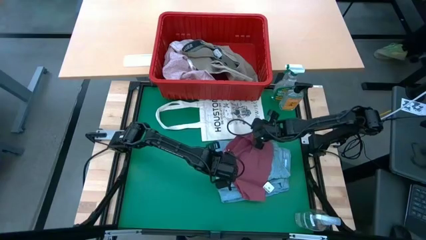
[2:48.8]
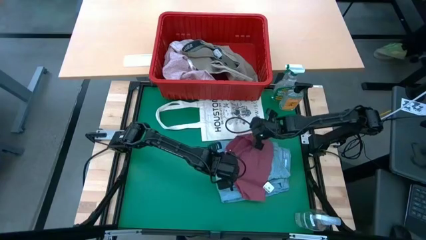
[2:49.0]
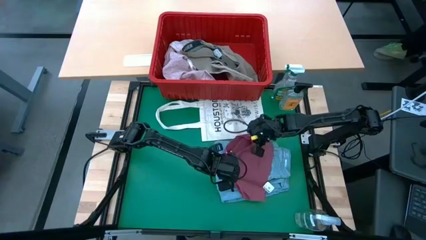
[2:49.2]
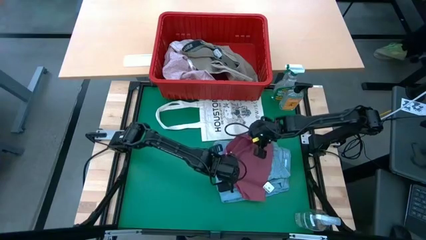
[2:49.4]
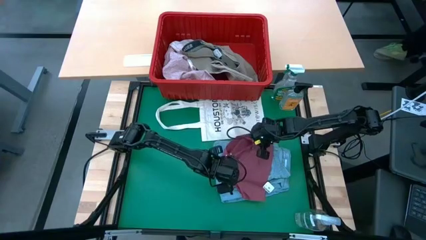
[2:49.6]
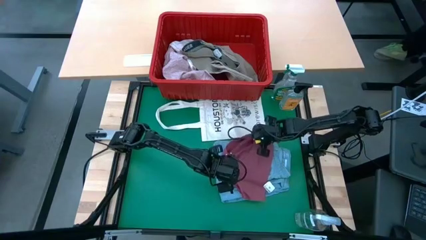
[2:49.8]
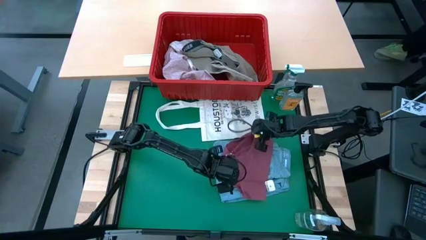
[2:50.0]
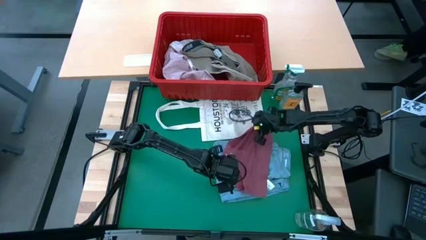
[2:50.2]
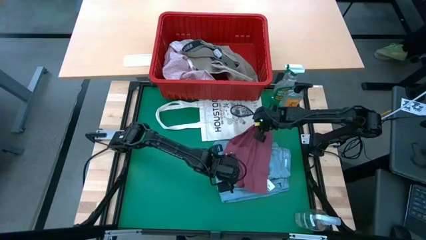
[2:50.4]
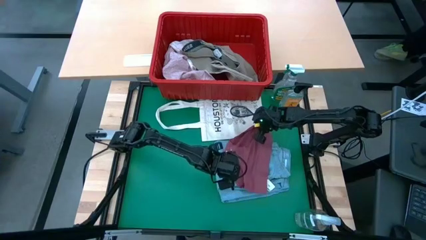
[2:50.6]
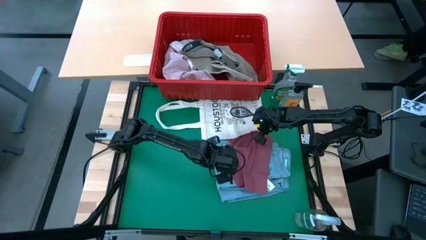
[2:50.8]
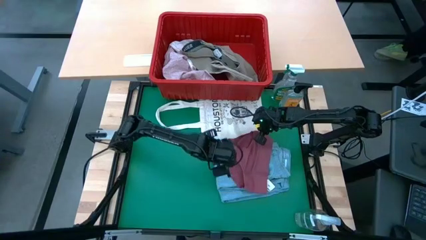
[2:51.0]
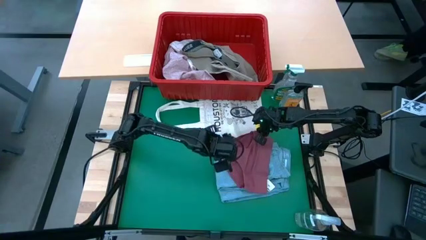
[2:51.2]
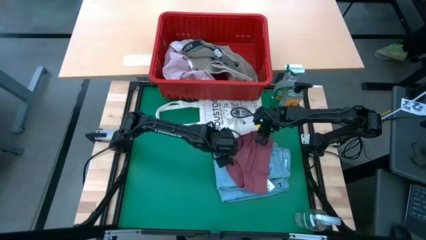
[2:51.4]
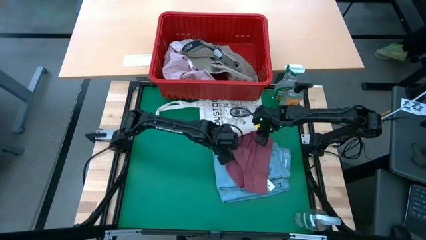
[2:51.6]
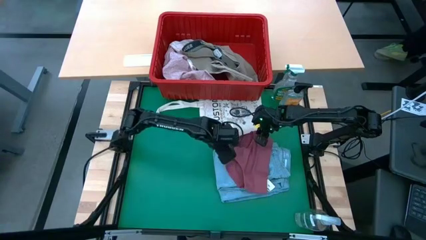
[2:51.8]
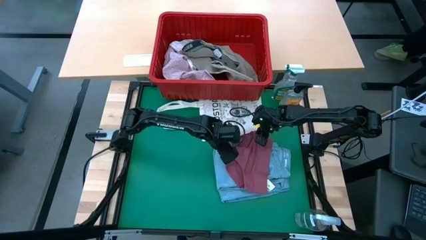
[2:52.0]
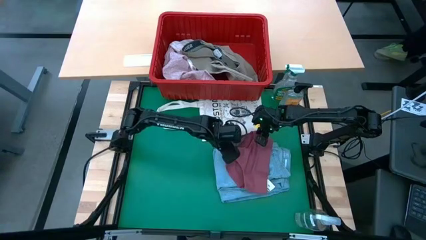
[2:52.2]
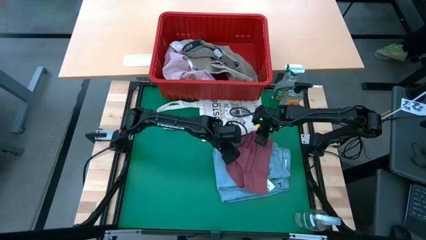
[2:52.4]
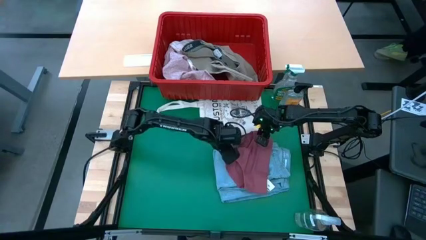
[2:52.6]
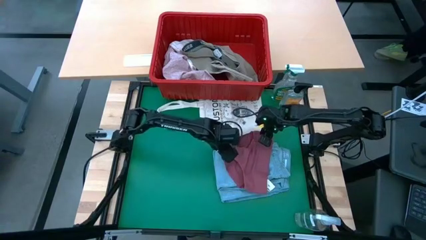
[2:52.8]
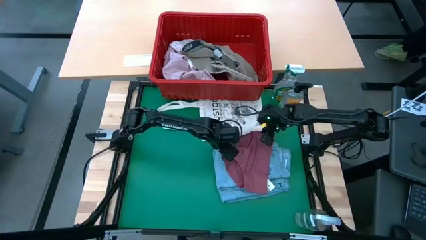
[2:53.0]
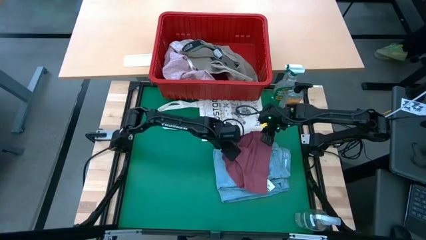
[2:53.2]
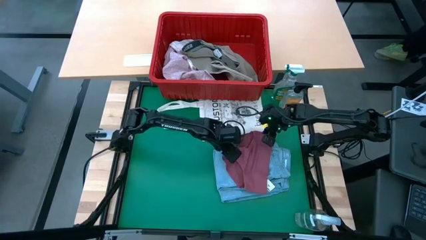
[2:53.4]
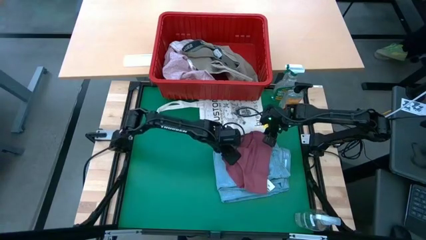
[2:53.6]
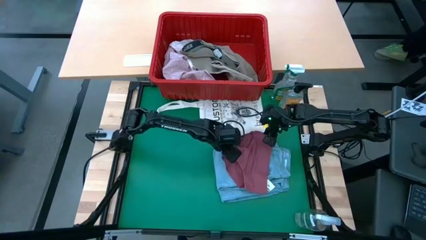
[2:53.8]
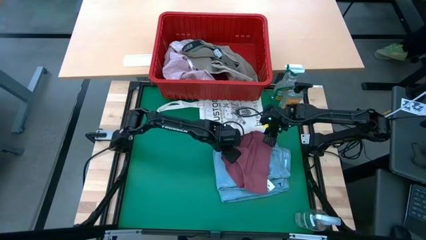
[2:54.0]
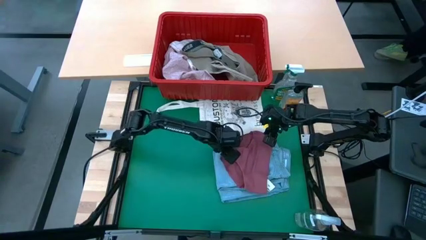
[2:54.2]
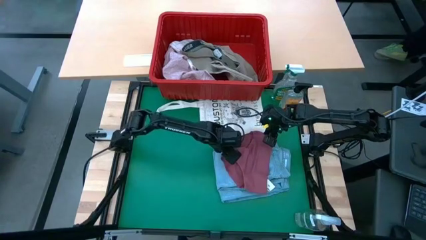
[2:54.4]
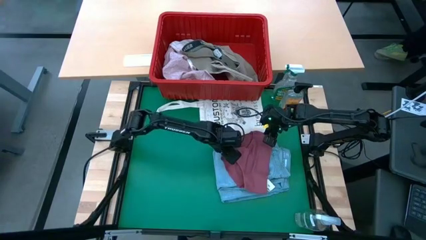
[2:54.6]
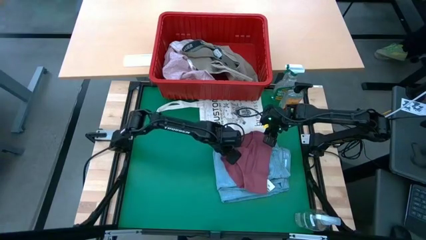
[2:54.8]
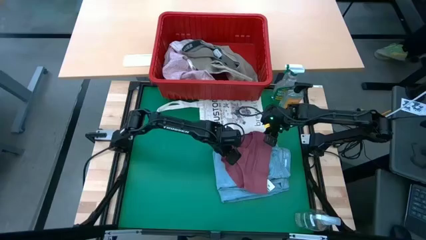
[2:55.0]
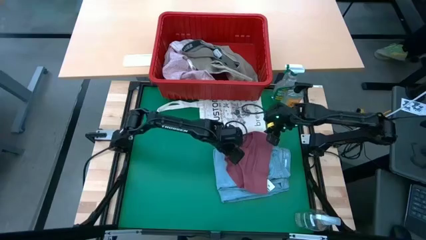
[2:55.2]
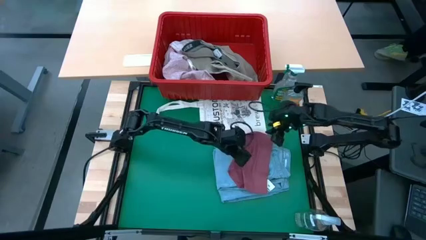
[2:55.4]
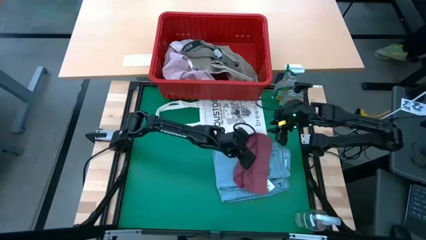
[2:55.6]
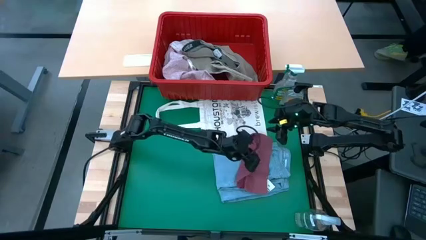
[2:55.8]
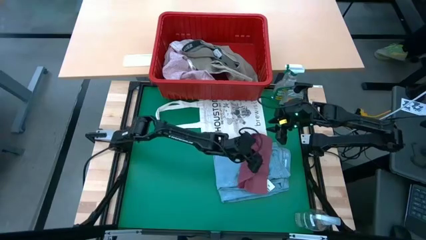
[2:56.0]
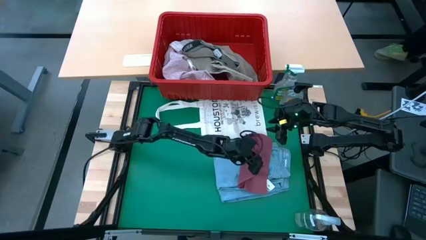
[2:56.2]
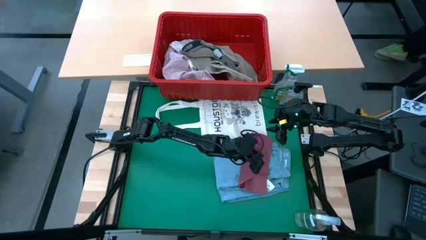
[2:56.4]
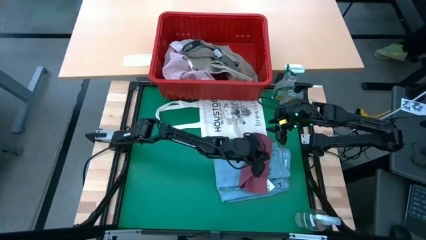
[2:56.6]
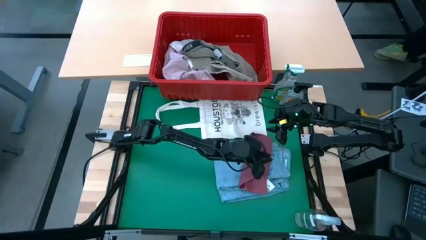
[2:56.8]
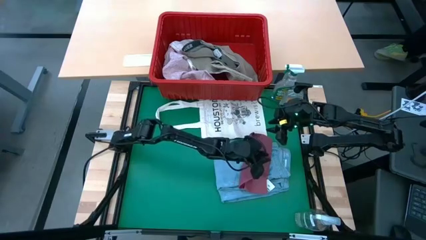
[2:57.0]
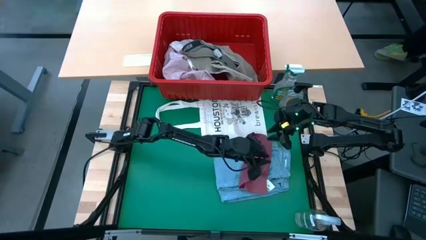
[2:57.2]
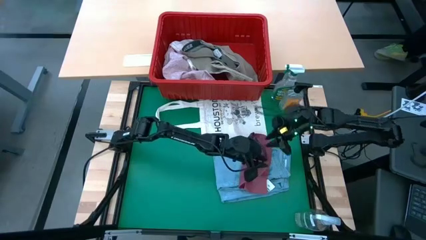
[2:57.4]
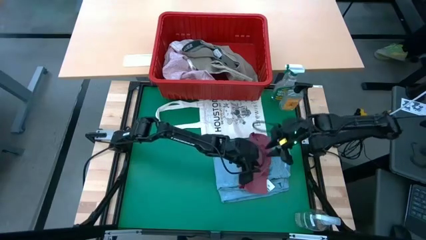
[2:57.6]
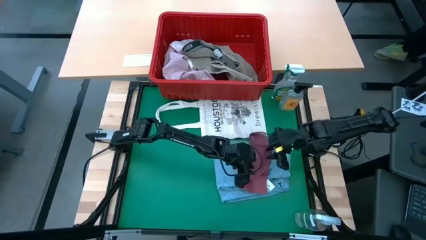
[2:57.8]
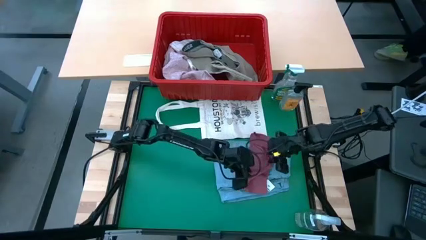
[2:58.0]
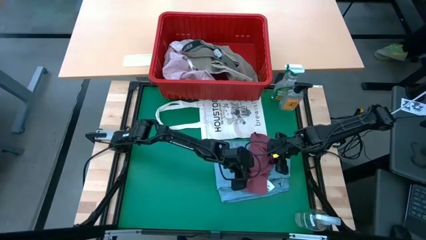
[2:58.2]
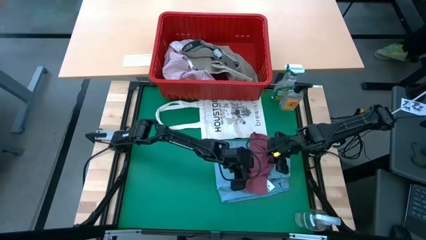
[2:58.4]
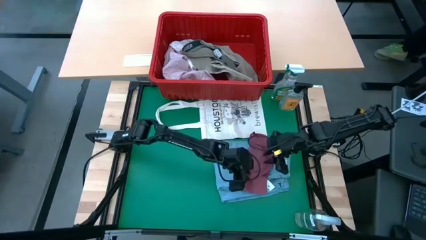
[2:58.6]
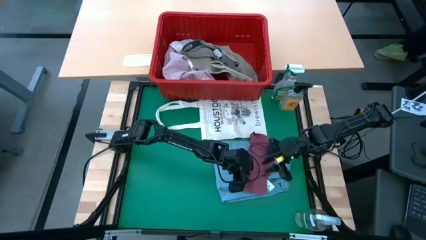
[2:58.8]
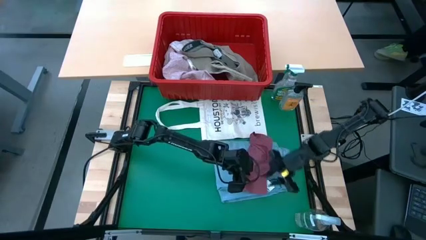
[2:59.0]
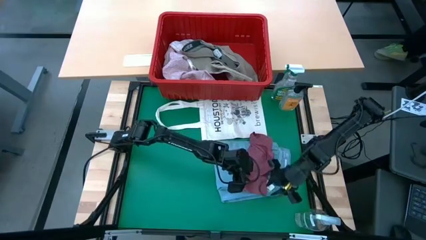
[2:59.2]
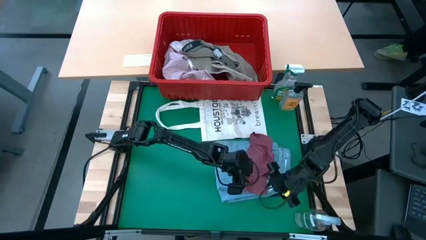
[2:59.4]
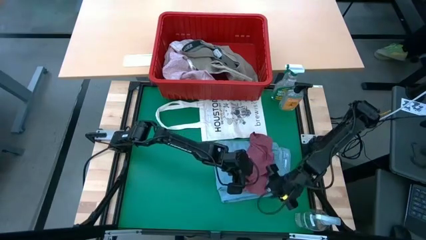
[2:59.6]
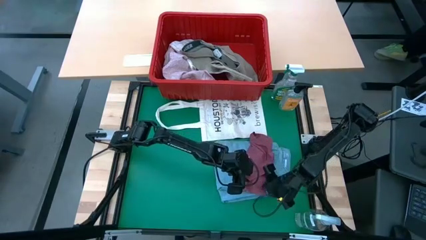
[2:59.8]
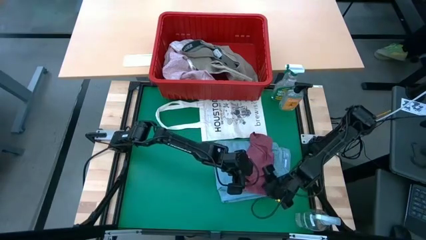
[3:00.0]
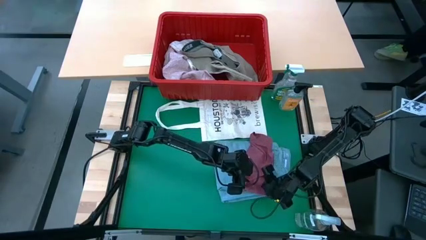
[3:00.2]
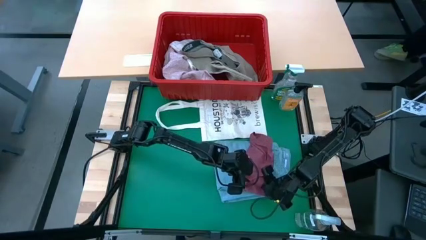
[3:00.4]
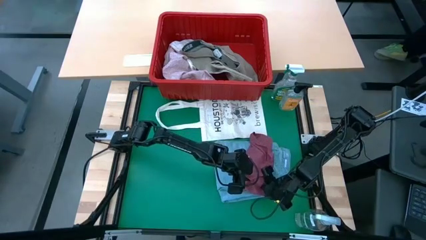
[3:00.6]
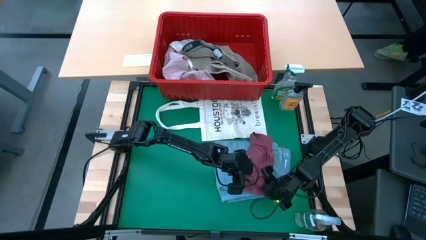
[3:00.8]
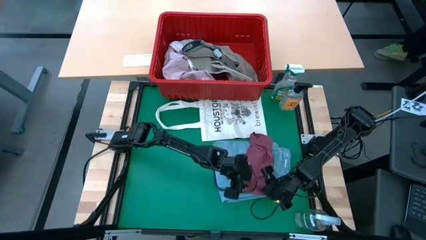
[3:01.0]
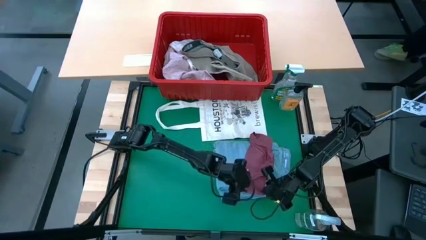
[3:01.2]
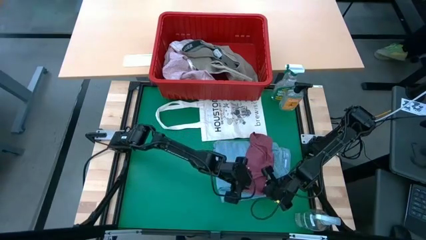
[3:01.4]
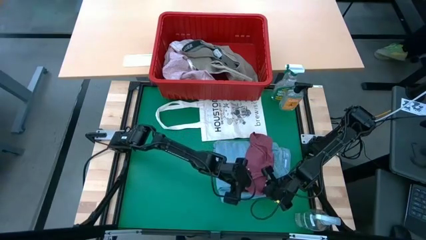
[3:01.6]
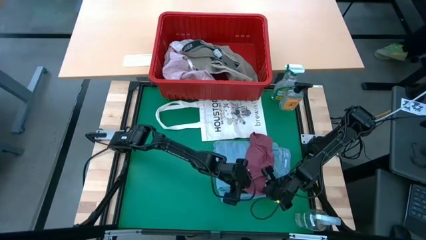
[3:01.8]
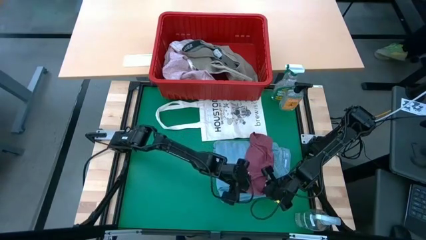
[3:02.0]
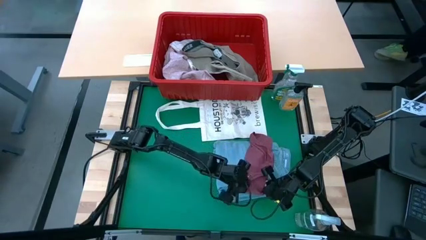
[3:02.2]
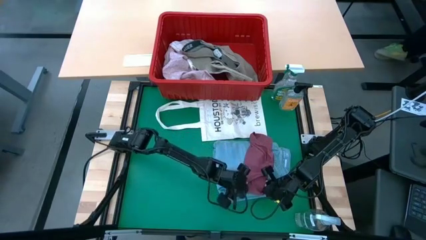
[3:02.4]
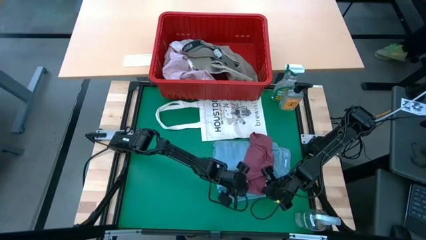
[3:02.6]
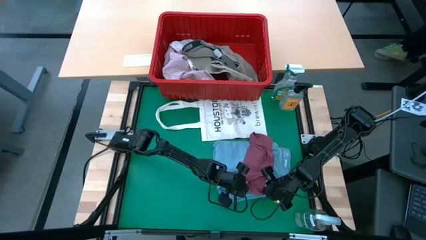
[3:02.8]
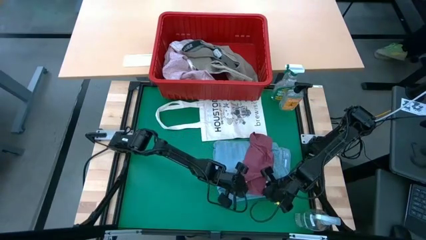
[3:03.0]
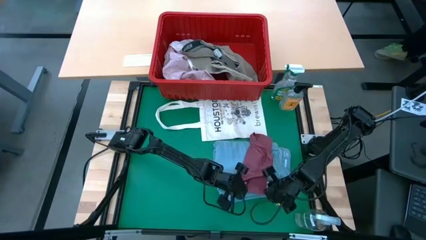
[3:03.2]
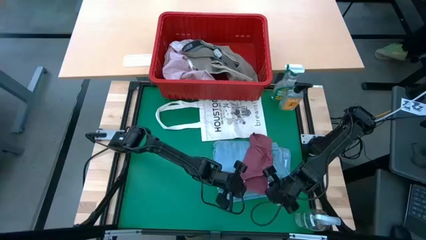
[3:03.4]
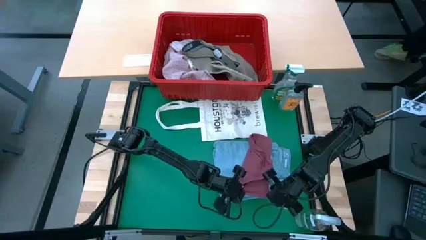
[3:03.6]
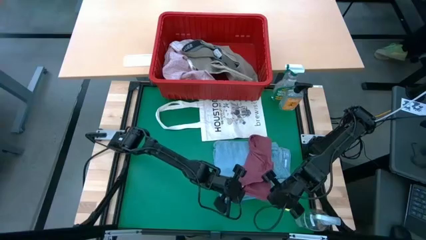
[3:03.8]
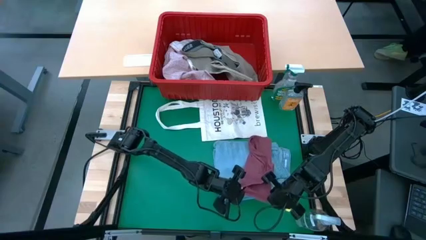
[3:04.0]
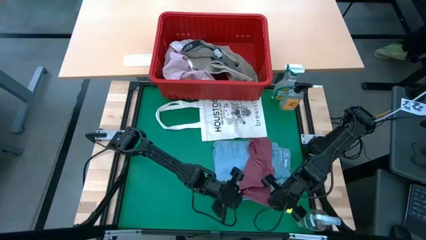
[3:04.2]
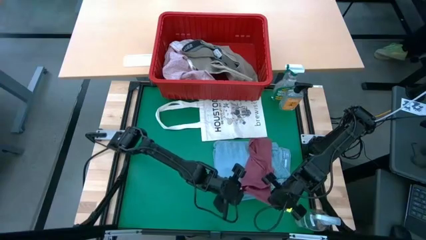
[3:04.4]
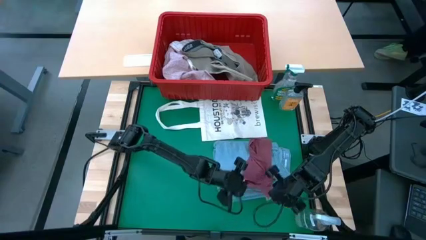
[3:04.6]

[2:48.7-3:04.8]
Task: Fold Laundry from Bin
Fold the red underwear from the red laundry basket
